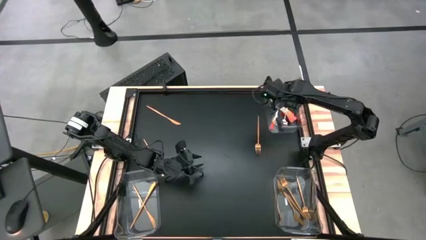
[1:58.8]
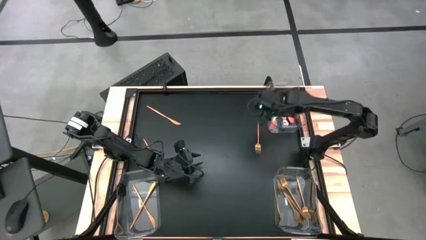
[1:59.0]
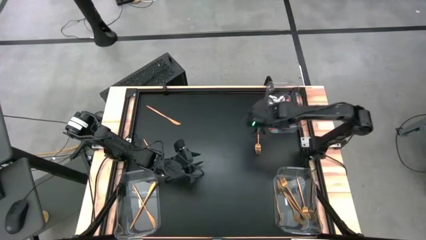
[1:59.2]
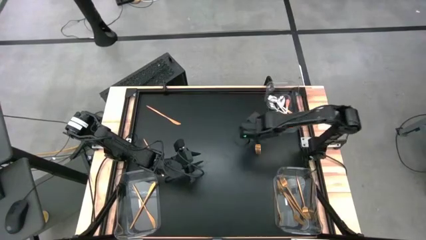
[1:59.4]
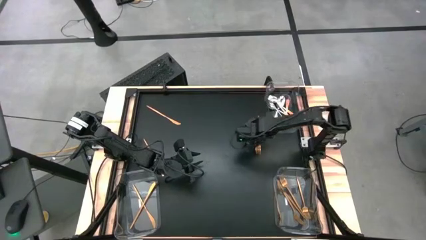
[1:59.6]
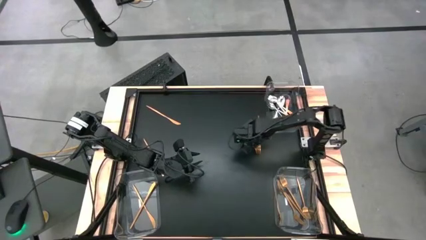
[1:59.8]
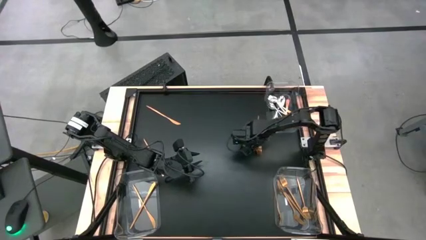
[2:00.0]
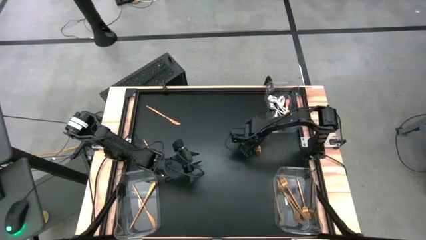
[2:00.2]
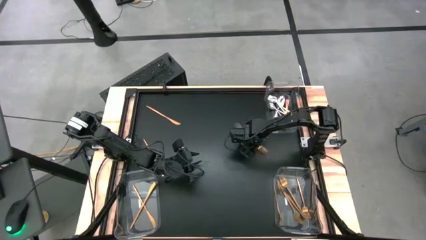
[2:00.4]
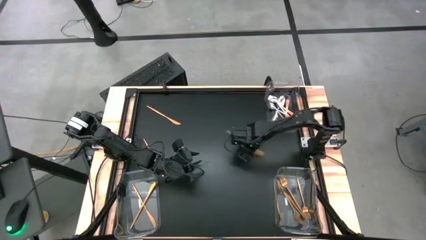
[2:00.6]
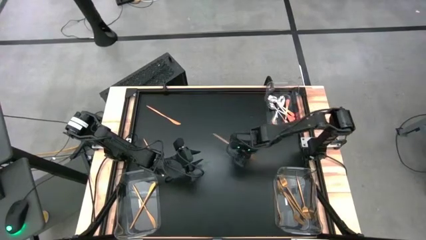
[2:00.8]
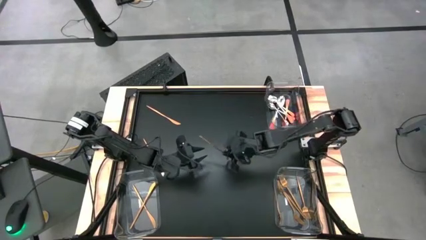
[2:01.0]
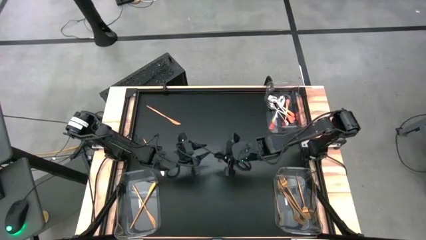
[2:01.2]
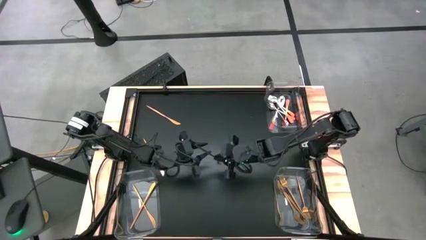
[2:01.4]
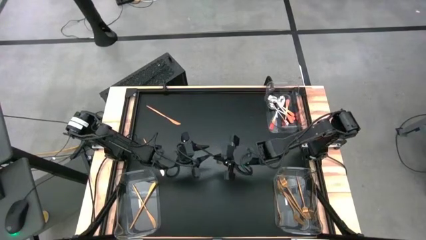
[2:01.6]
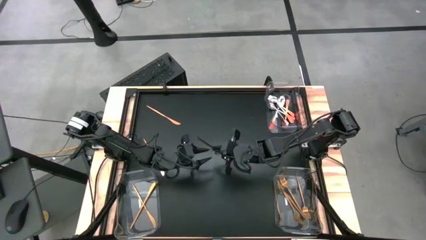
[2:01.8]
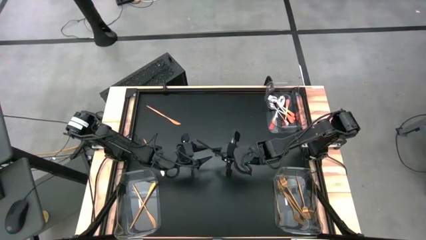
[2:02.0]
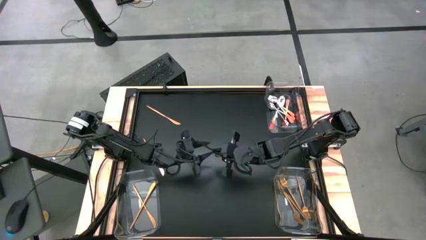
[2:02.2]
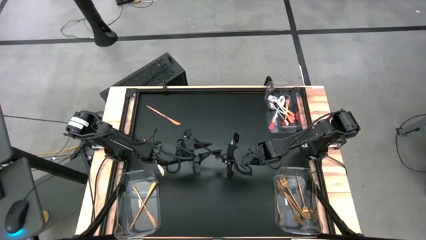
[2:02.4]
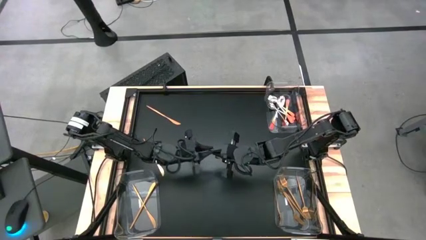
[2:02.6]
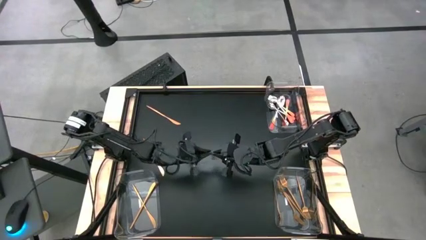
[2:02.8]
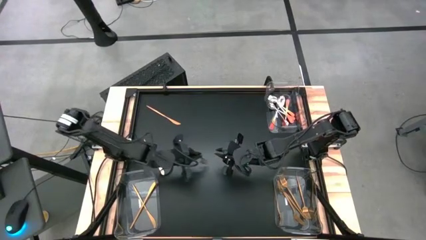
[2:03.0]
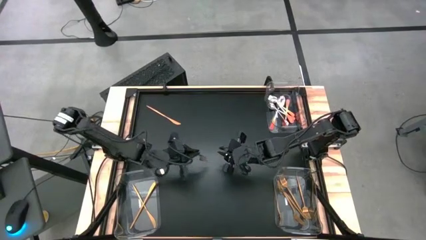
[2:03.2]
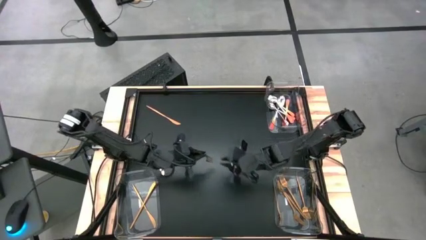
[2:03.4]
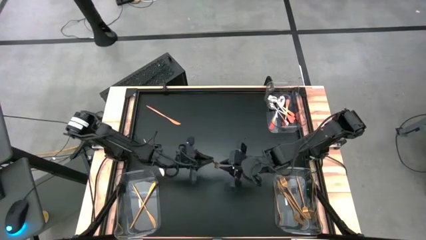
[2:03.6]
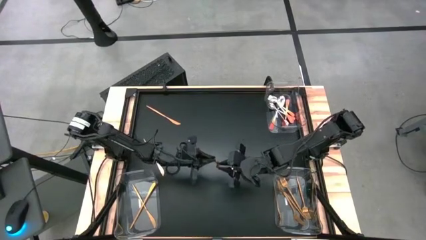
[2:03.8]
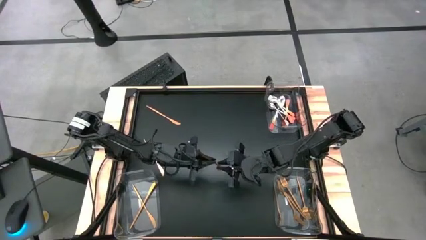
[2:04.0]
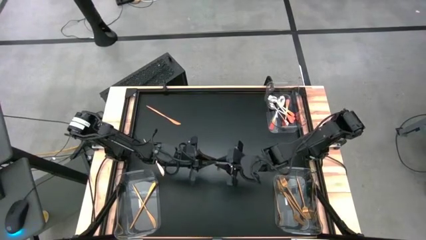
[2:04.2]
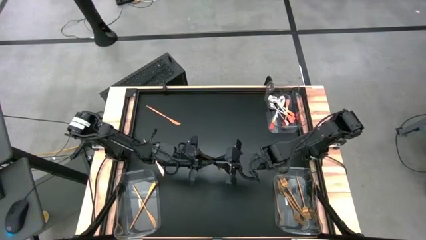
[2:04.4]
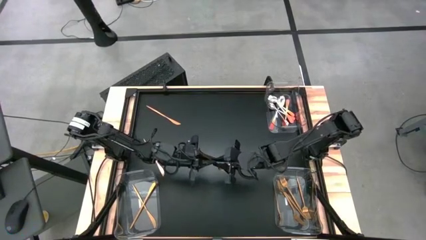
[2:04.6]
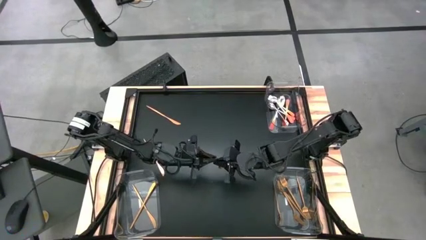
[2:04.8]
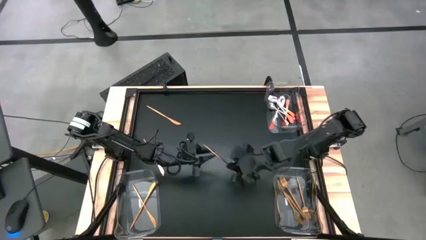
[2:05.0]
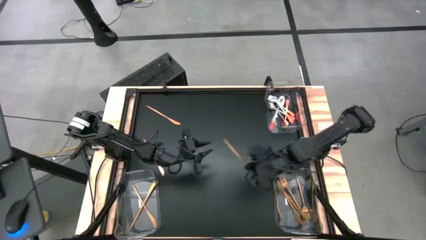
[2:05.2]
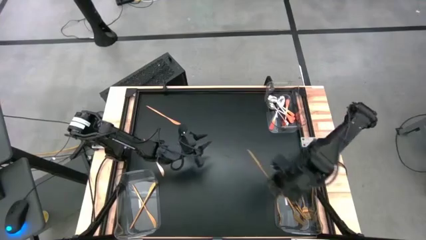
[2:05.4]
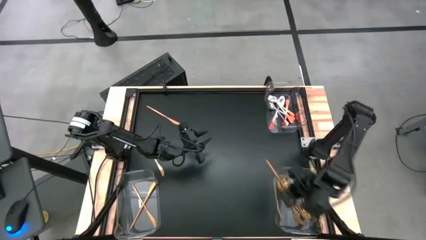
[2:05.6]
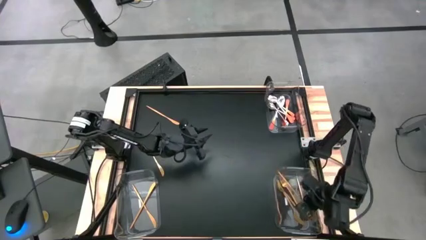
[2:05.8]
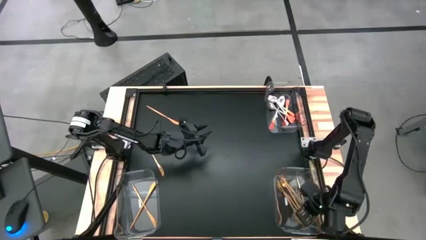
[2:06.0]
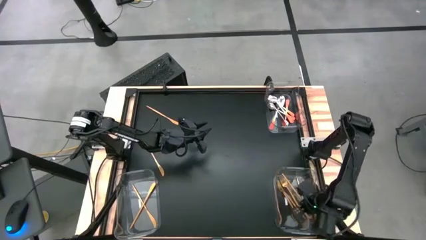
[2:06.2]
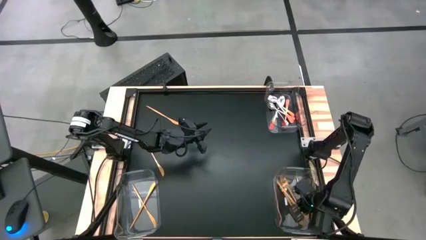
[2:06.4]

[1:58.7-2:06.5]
Task: Sort silverware by color (type)
Put the gold fork into the bottom right transparent bin

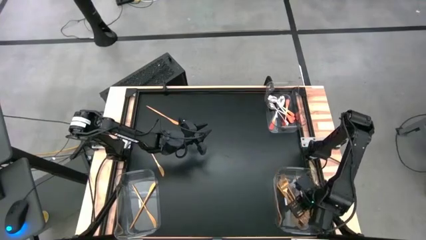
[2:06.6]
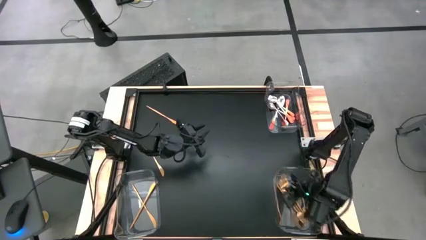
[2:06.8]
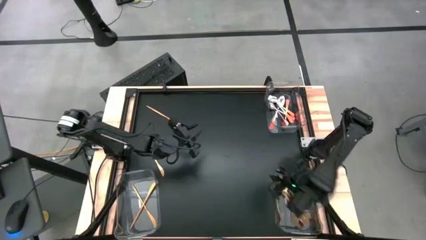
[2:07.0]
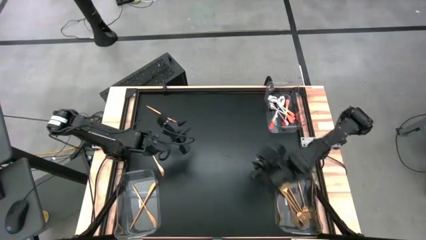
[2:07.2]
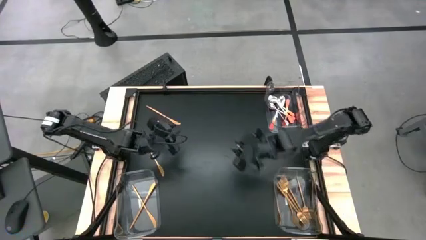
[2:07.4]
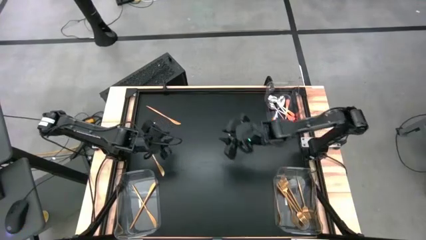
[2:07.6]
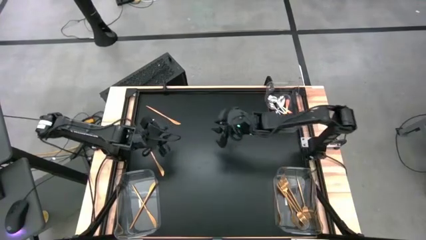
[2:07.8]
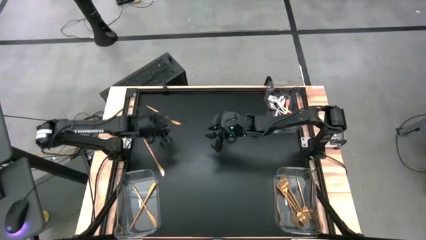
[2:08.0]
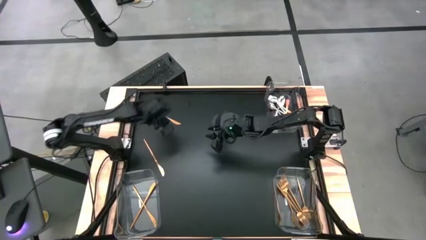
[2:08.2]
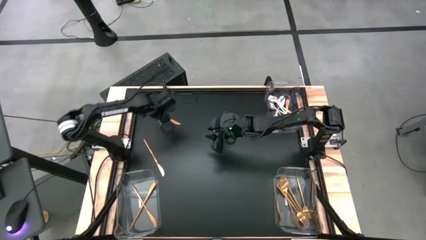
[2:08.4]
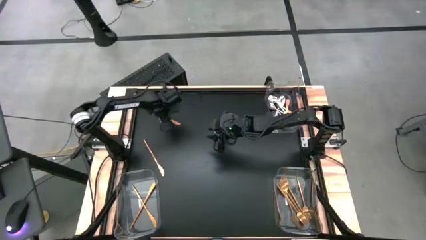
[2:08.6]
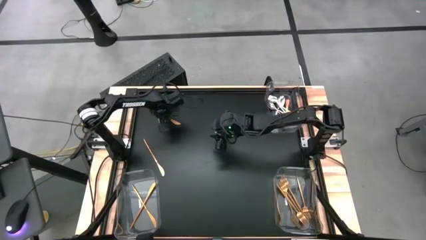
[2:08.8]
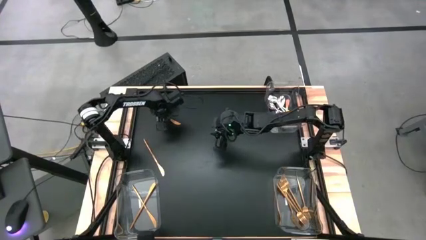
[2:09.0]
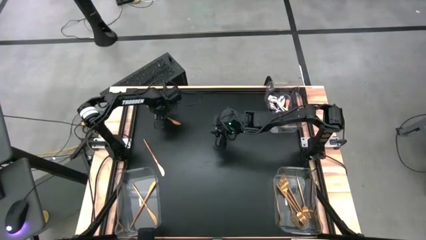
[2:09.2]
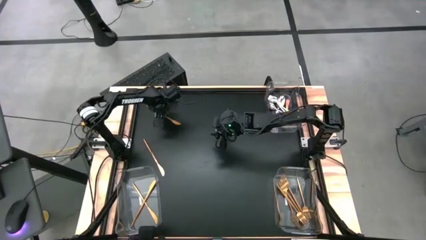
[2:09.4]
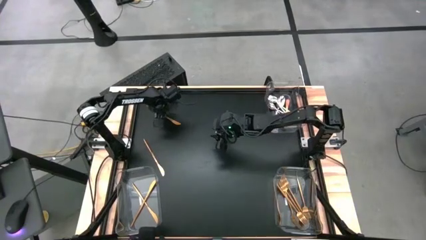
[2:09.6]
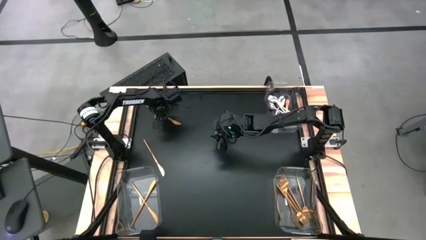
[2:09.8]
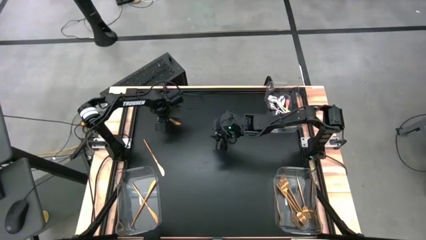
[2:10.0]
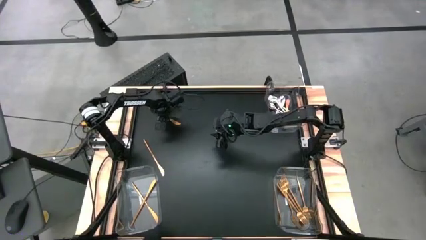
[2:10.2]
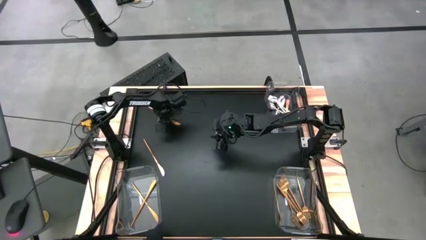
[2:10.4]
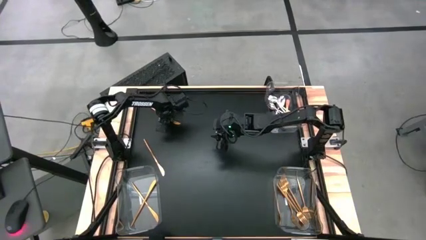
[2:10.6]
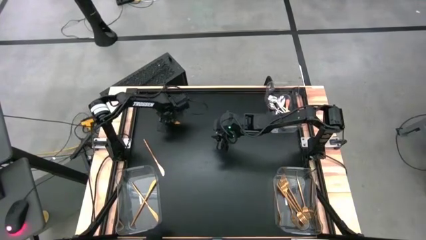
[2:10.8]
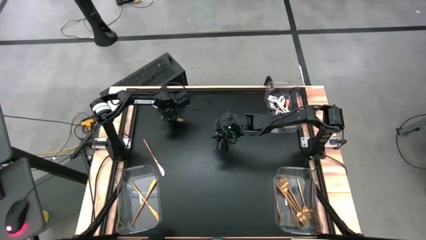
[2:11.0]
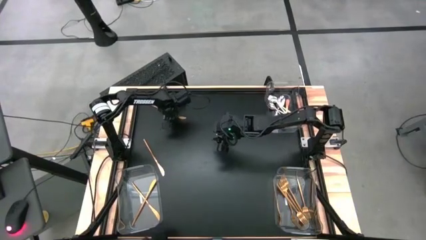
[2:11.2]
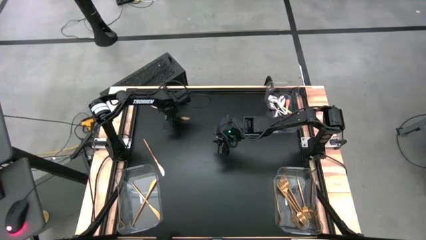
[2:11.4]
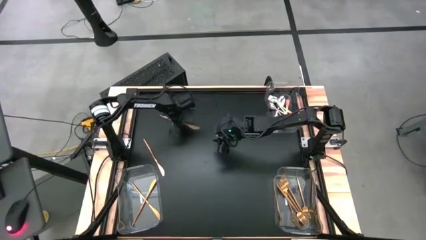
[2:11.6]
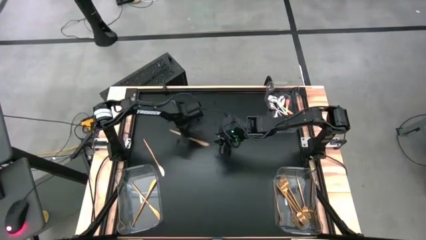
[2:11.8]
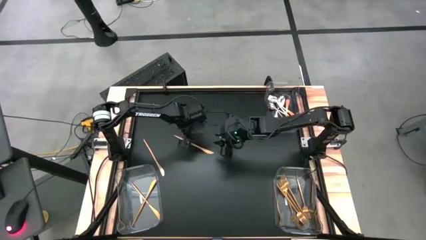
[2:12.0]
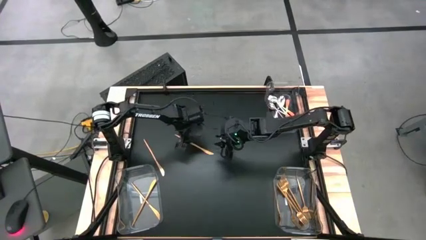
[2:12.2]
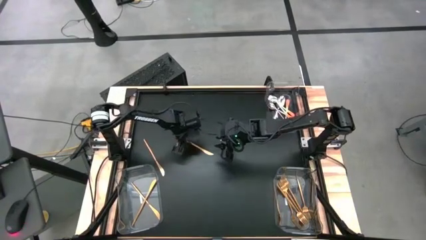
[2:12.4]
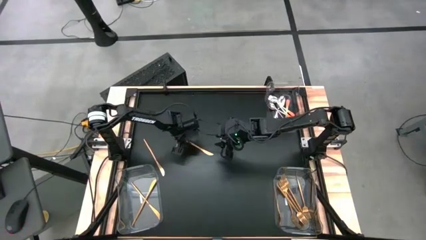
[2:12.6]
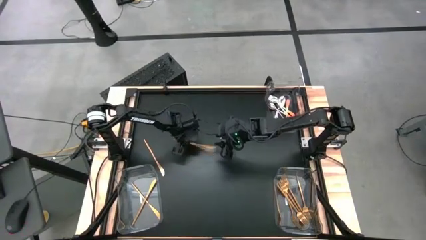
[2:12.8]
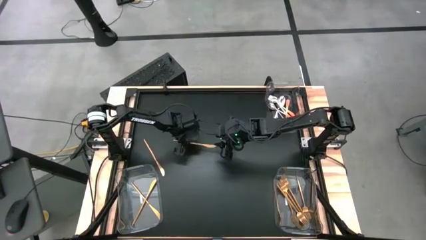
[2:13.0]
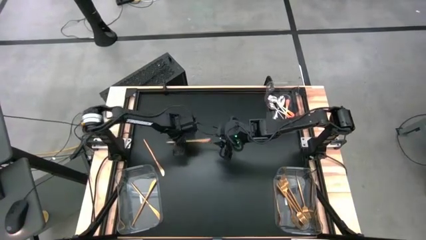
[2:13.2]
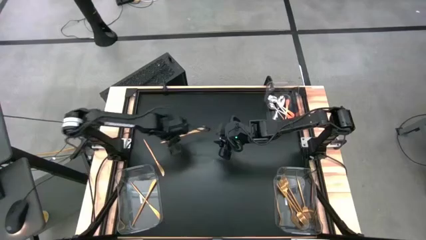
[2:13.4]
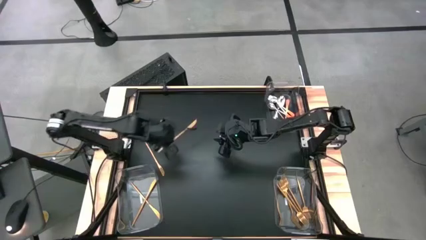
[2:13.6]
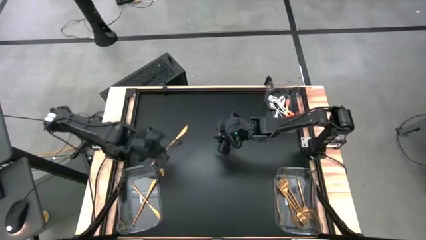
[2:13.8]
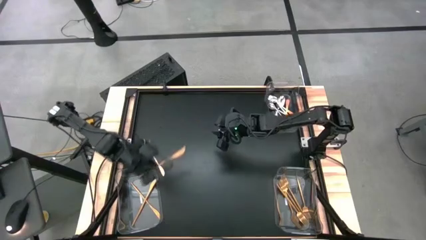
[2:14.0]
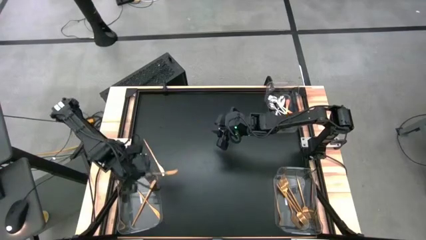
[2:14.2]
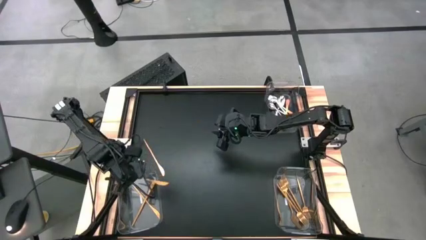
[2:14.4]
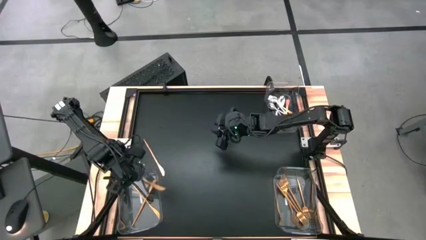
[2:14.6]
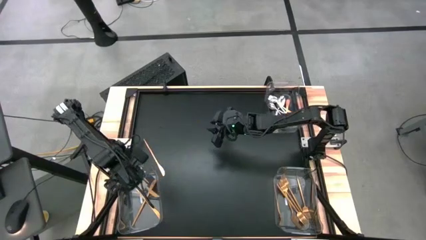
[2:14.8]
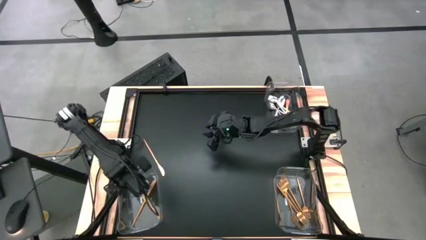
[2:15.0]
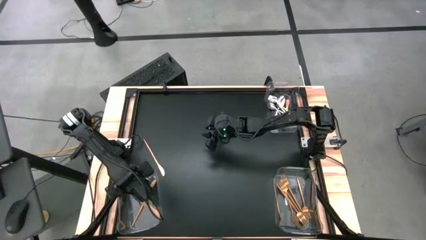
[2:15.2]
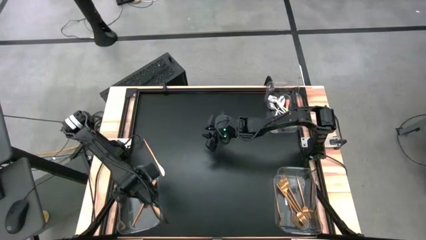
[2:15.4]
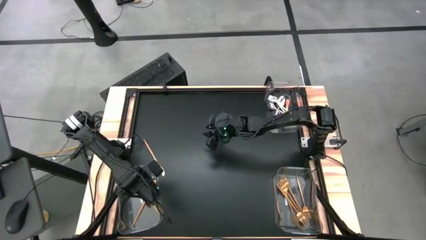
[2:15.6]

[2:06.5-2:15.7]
Put the gold table knife into the bottom left transparent bin
